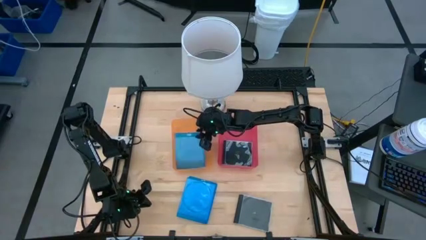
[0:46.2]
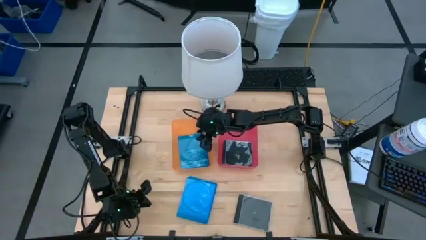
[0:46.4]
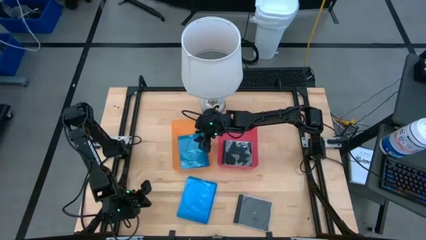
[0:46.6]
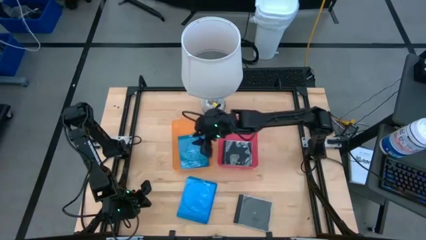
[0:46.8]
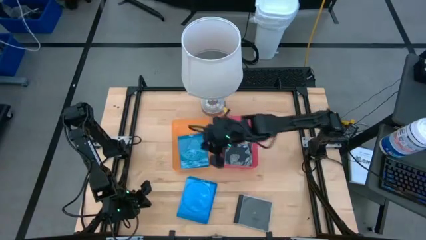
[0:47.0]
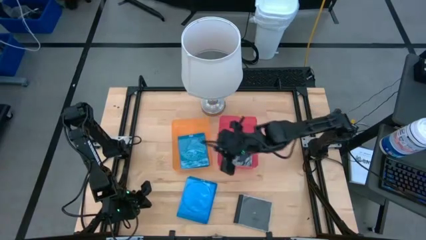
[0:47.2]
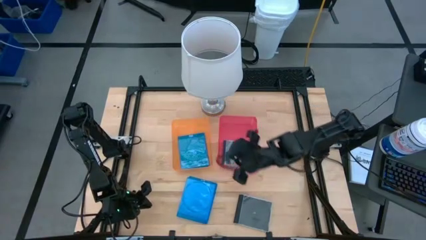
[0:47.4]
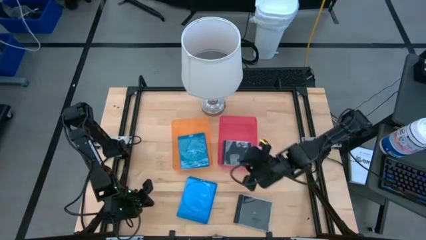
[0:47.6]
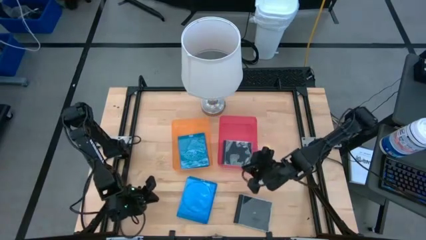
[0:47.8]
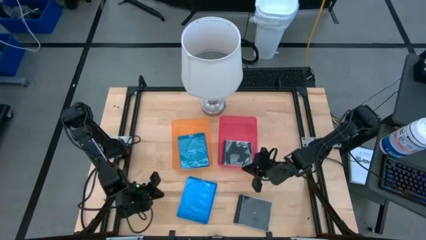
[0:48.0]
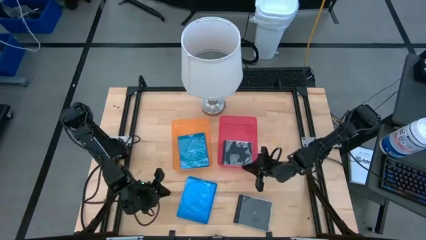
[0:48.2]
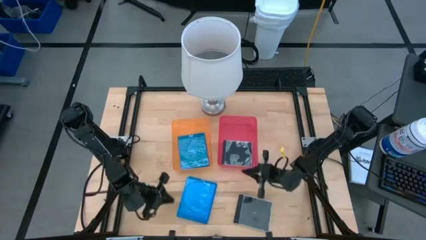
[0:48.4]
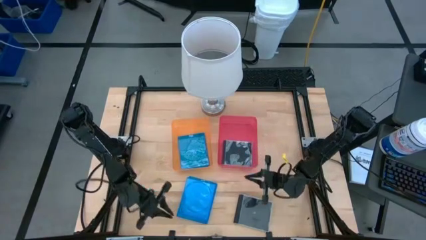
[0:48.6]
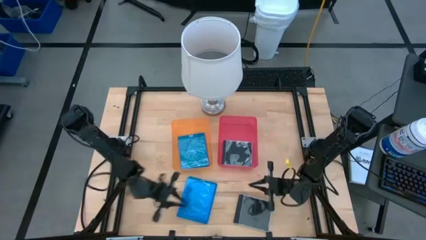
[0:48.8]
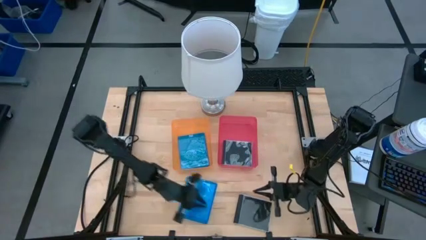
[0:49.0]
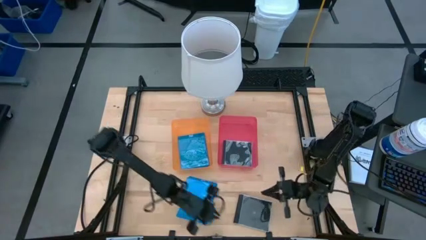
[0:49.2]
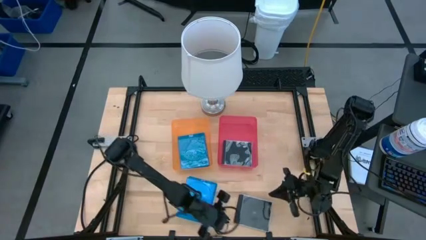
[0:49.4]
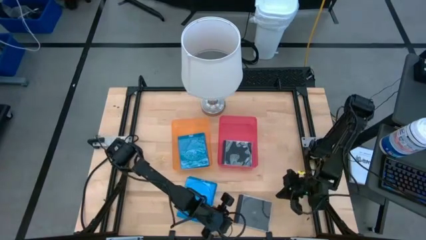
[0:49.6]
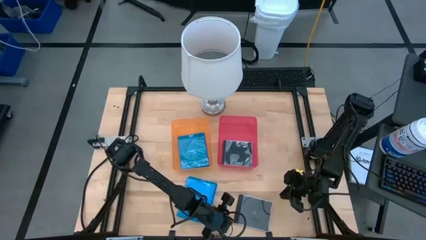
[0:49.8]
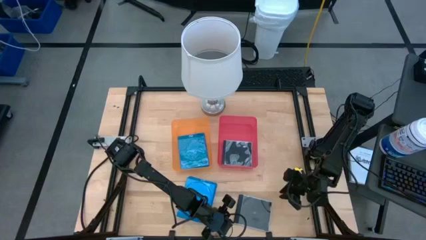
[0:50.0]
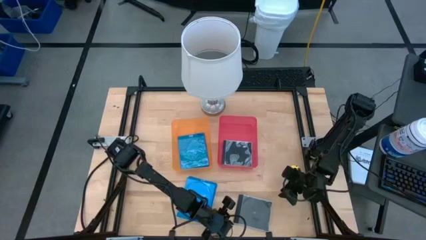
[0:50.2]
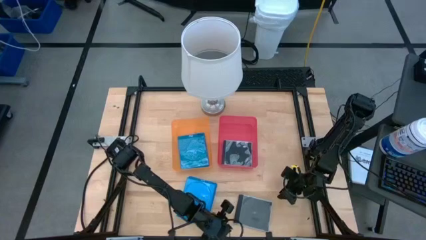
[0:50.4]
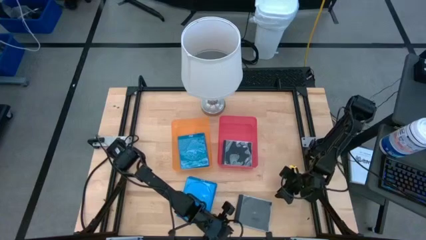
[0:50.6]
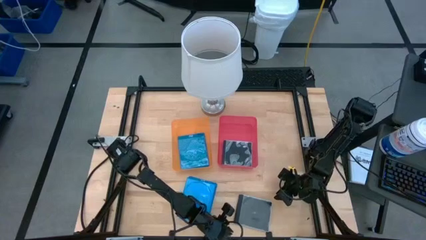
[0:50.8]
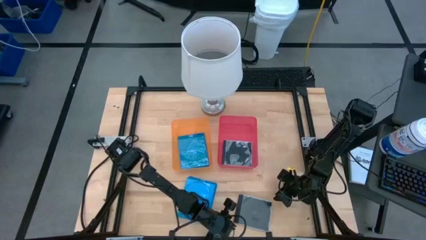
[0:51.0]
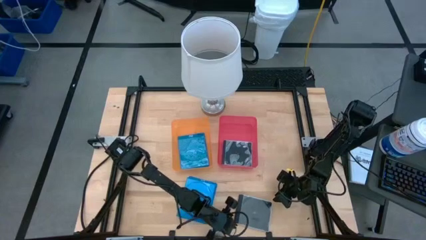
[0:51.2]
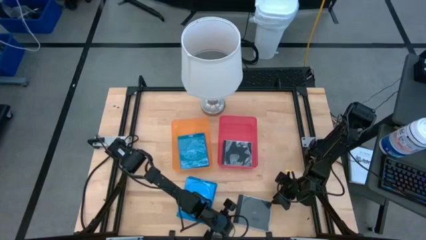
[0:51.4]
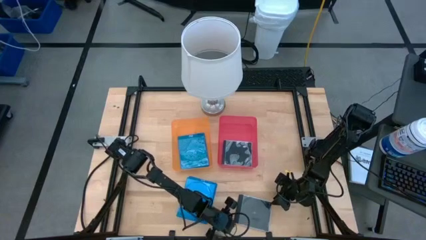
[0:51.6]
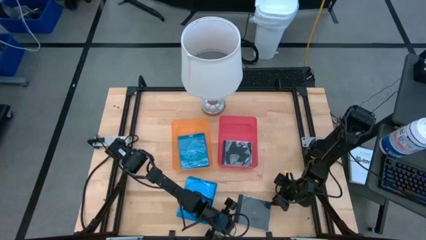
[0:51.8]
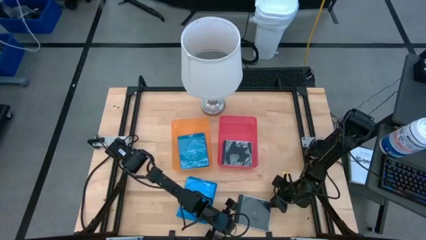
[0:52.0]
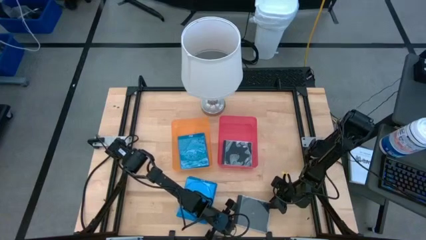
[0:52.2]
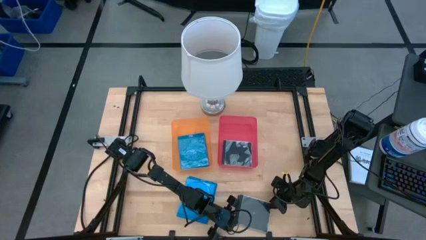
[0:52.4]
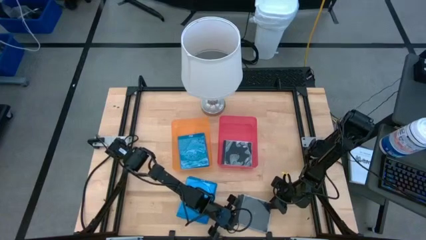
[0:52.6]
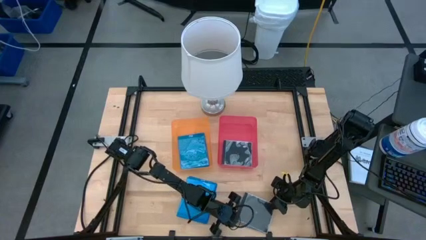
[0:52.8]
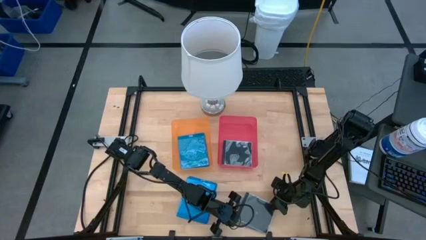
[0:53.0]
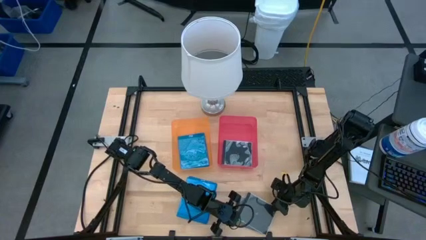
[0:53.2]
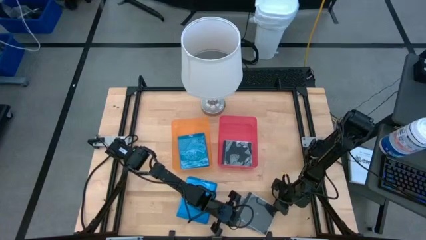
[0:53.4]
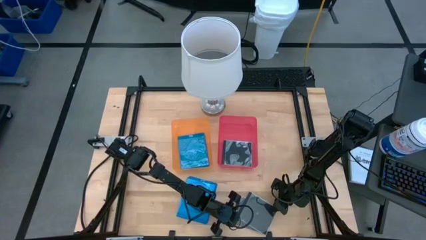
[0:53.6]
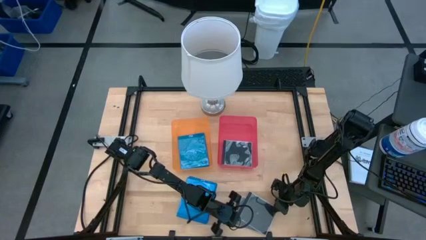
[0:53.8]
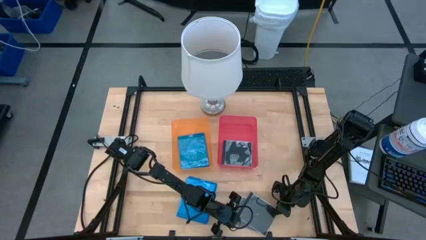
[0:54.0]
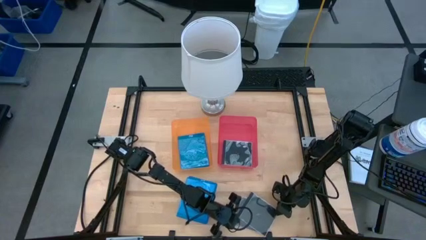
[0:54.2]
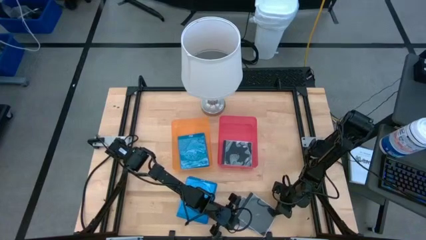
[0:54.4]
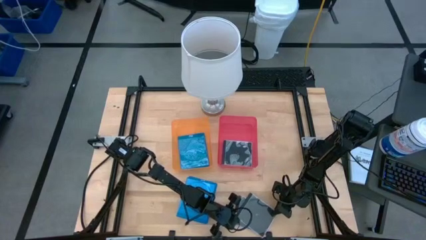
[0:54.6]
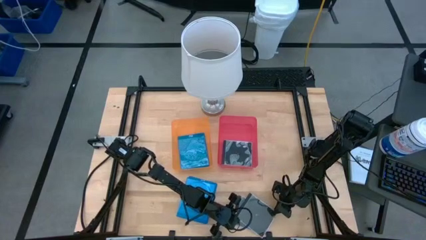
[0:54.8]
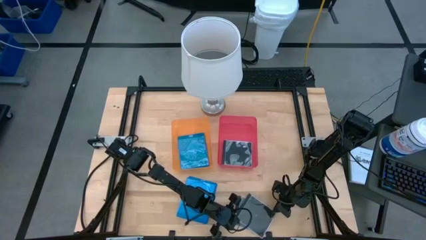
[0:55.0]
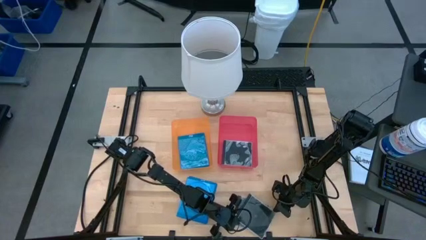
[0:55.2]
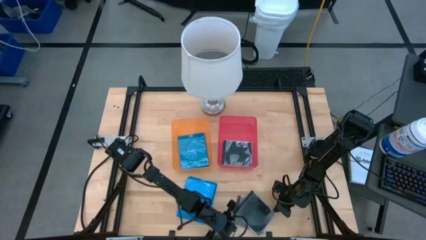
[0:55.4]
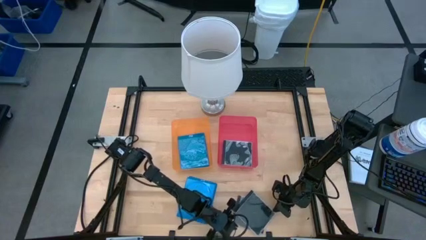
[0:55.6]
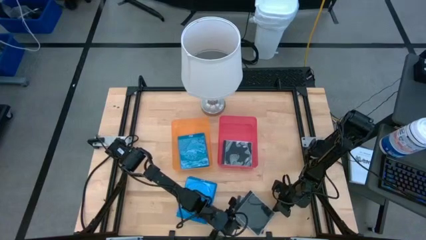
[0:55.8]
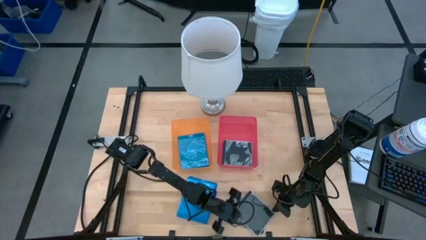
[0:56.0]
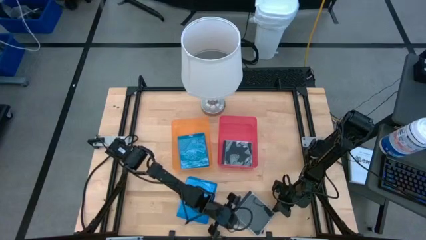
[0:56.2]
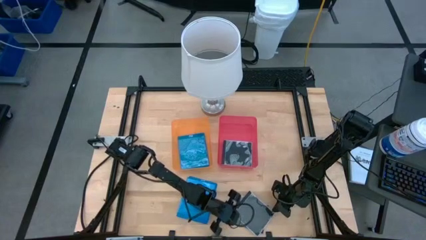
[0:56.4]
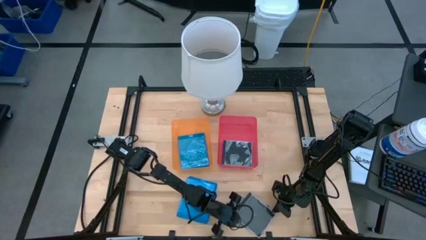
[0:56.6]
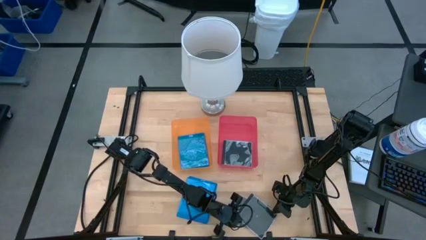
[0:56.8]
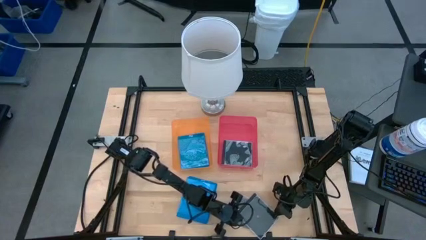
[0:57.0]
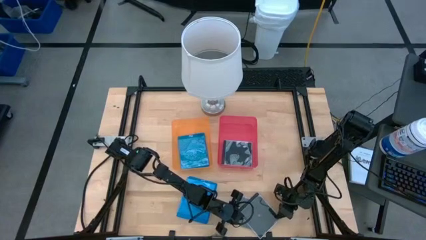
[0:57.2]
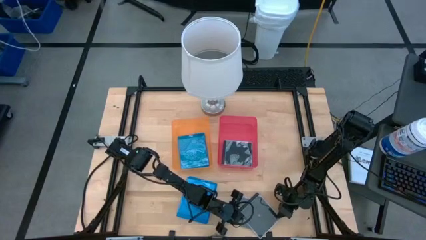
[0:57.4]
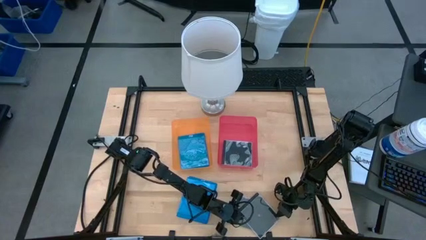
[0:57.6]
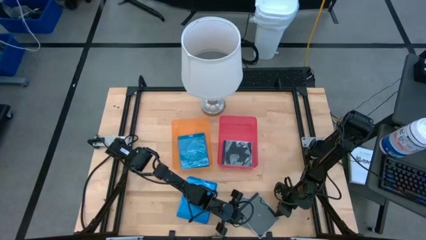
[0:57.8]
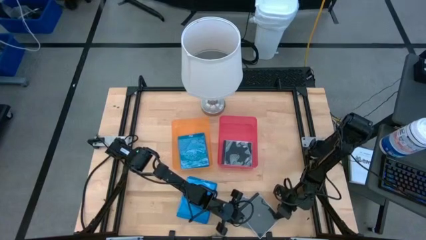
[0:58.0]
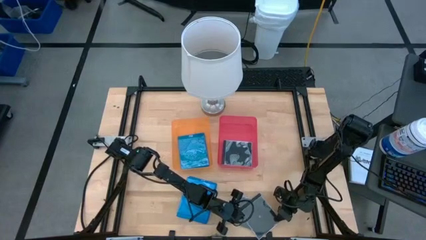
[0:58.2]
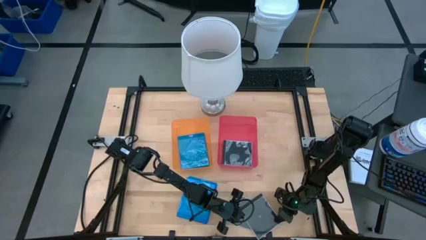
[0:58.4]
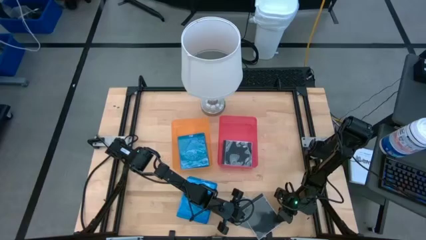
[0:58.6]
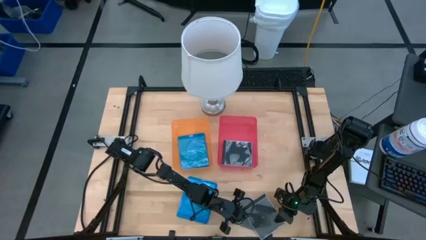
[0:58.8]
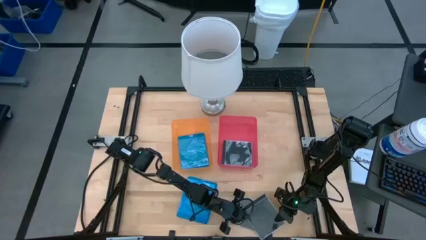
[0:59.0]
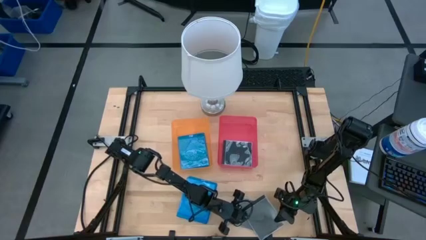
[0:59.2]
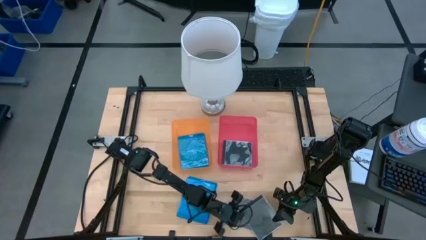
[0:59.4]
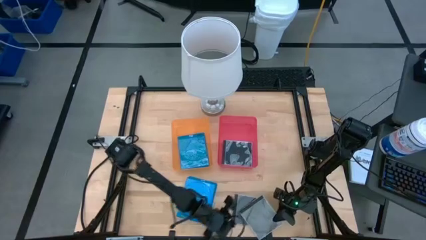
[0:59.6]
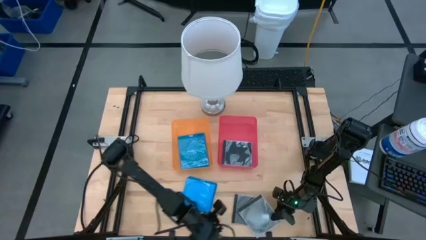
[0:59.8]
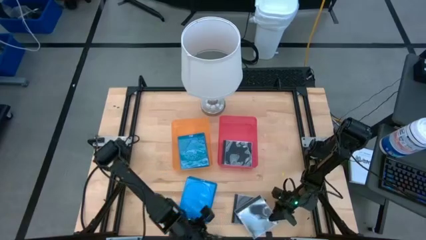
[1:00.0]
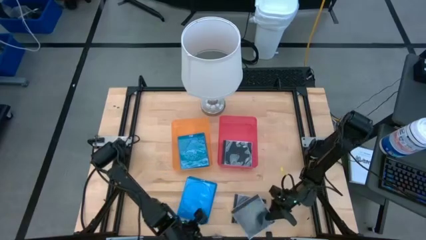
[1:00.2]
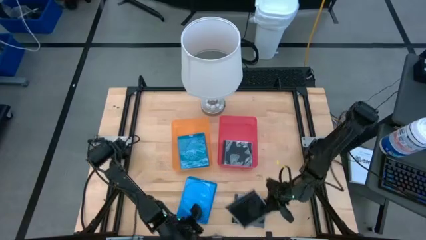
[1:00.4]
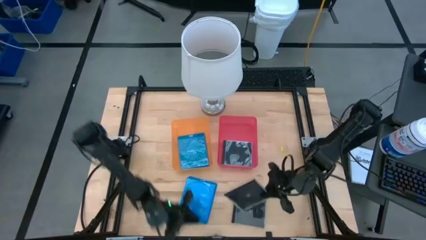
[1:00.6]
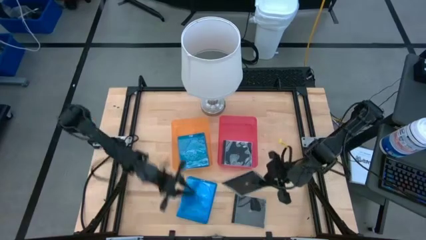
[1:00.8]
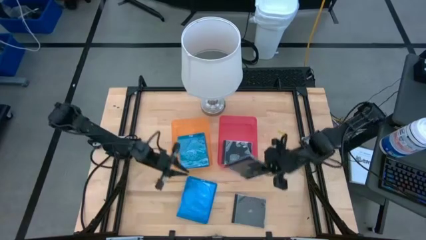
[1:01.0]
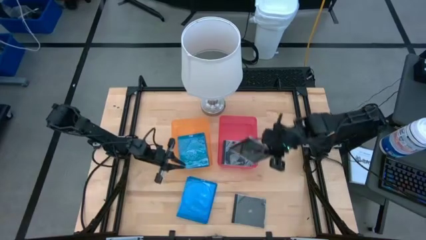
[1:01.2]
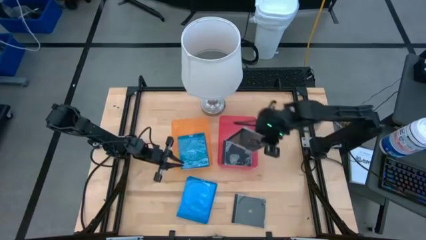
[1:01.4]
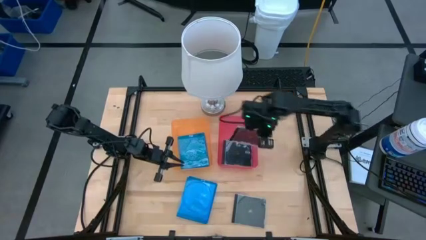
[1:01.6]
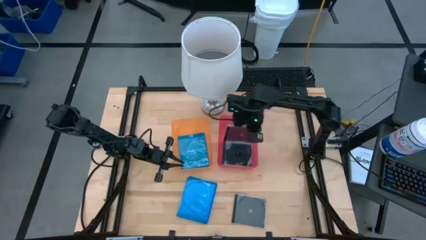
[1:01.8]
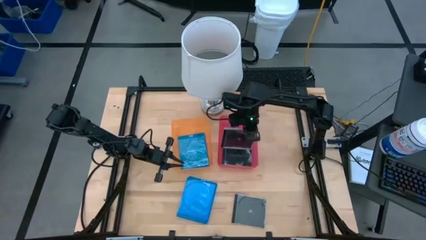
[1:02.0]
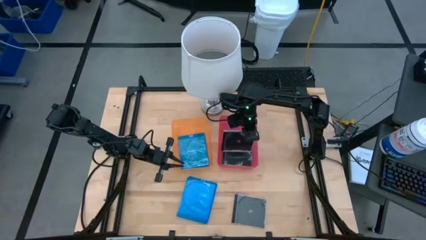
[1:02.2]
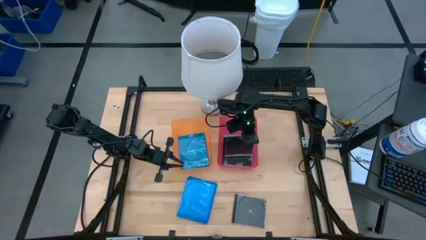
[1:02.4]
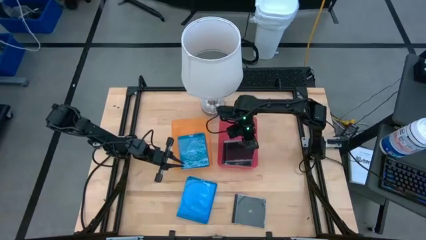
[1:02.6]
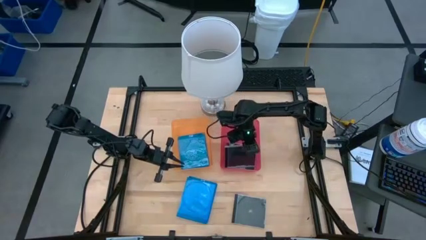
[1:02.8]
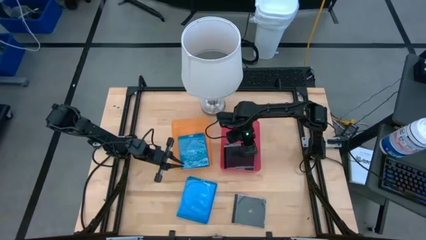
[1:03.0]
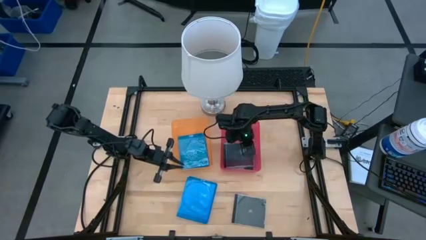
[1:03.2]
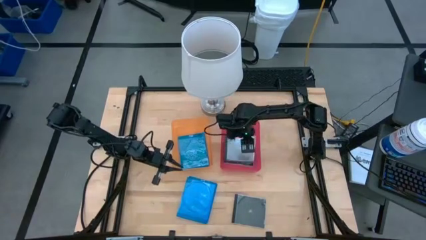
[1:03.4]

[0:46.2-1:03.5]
Task: Pick & place jewel cases by type
Put the black CD case into the red bin
